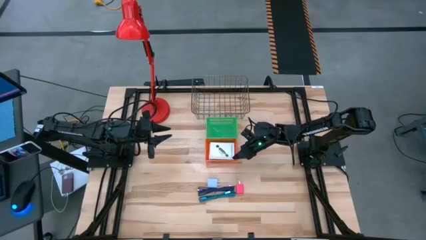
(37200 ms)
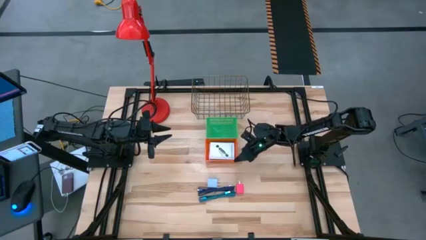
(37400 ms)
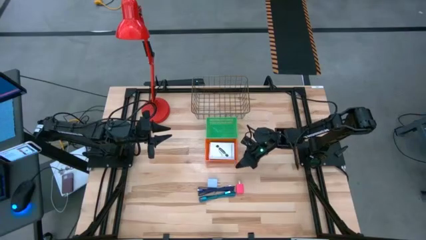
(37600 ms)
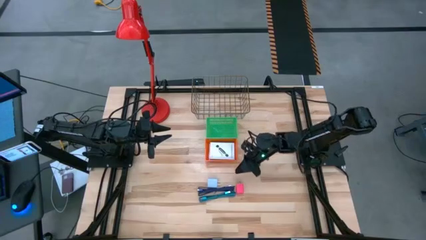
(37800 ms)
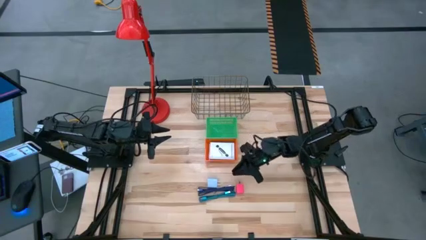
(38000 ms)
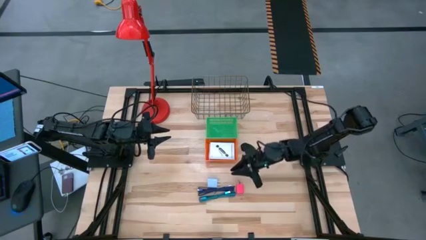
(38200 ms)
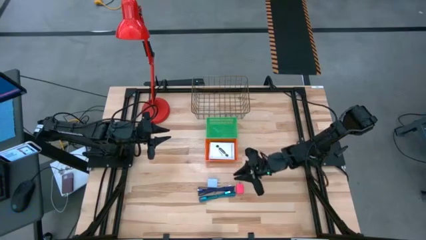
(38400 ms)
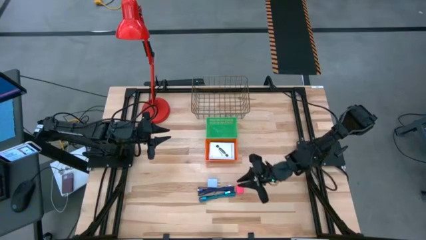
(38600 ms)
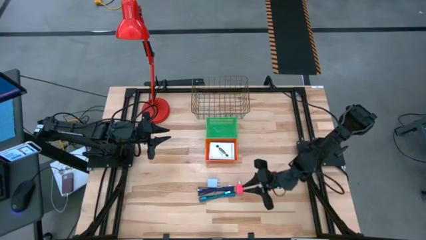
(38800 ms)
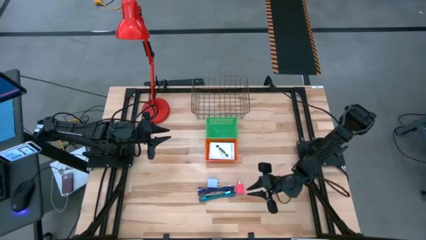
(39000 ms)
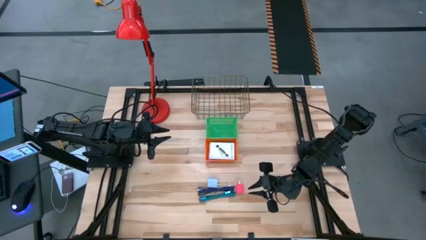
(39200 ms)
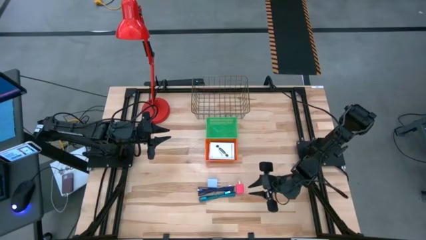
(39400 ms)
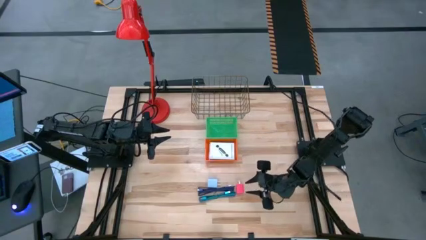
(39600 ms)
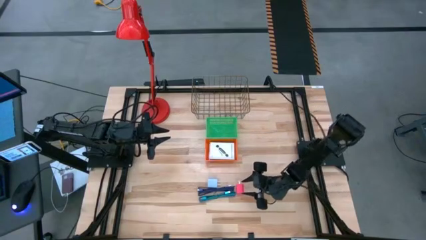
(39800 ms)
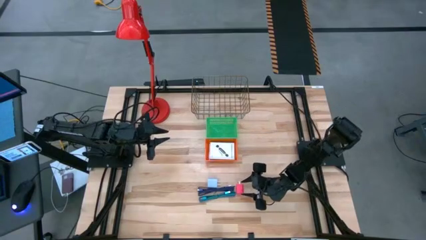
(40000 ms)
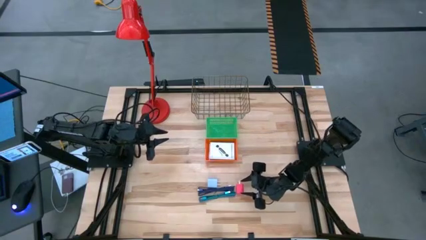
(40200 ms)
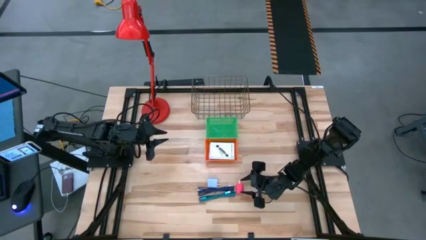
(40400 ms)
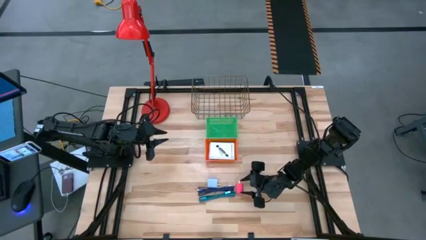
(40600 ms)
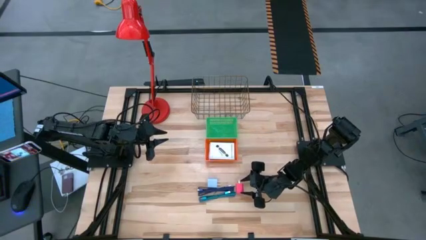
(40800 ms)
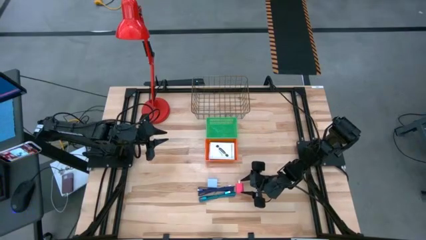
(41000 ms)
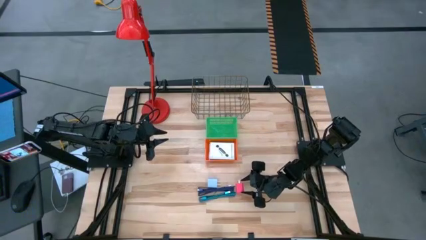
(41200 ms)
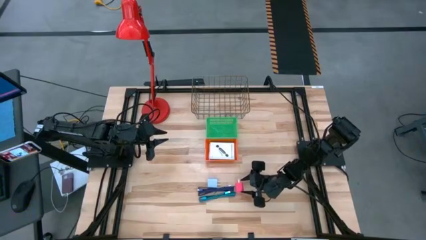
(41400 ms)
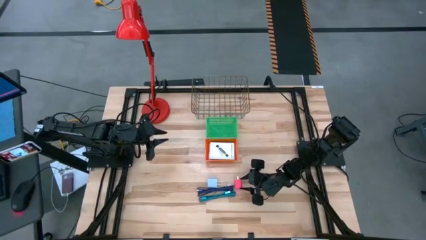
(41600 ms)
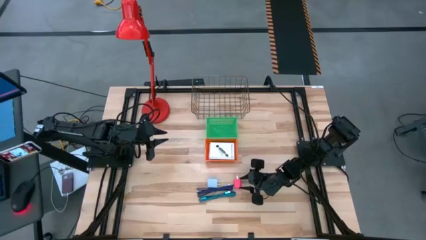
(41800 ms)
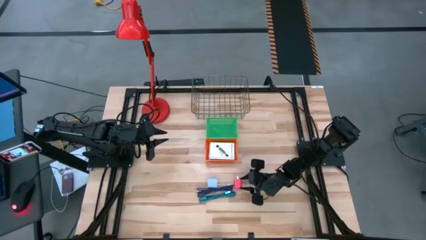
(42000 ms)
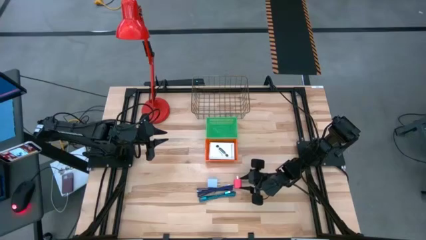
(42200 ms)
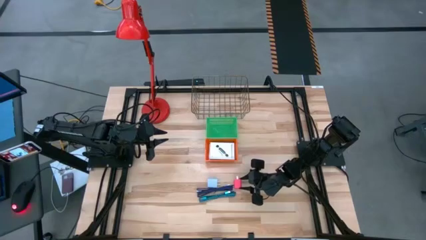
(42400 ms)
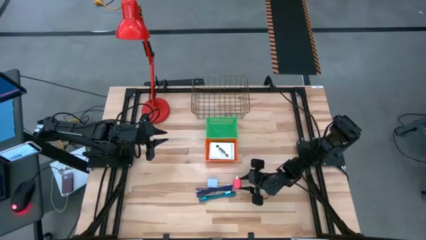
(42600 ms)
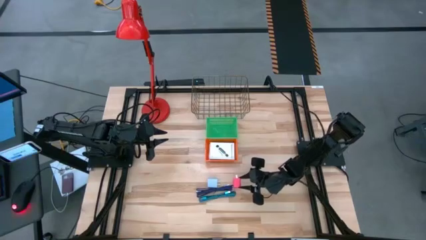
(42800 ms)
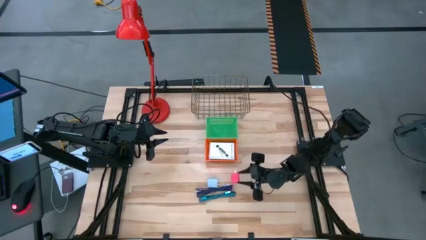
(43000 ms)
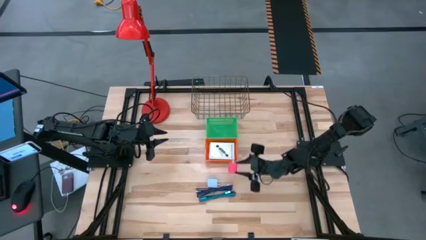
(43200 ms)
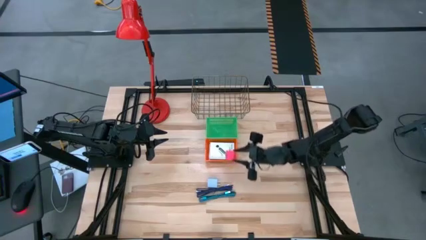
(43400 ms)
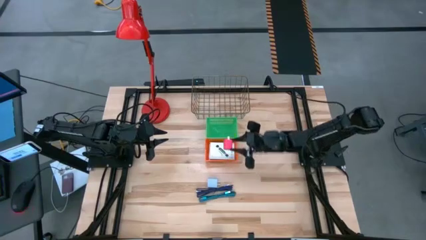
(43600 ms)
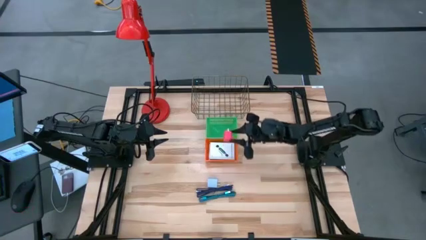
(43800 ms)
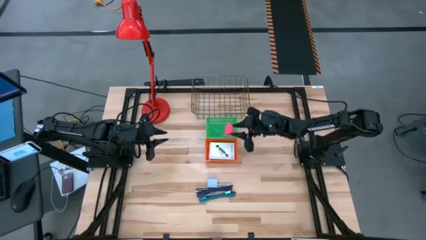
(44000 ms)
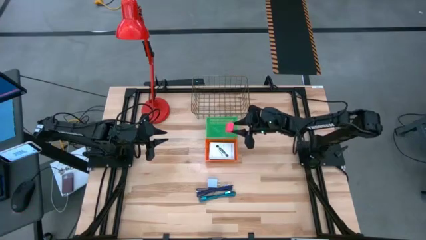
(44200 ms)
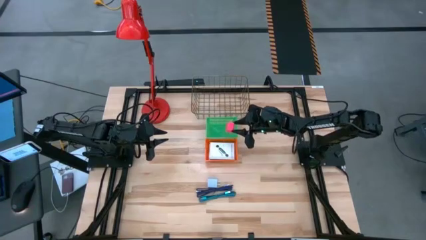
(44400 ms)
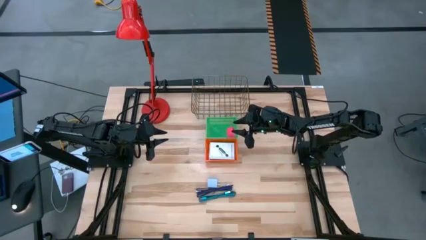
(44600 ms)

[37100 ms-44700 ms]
Task: Pick and place items into bin
Put the pink charger adapter into the green basket

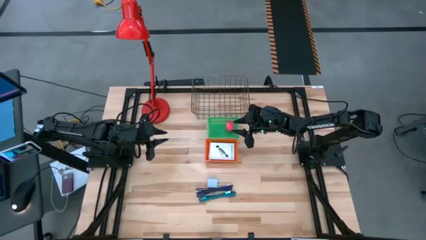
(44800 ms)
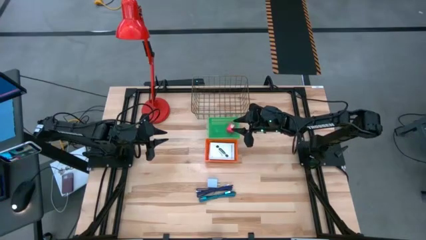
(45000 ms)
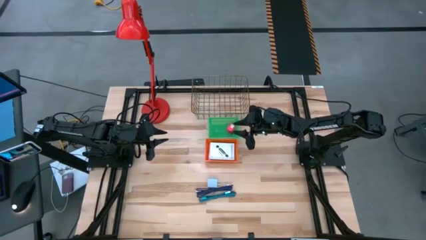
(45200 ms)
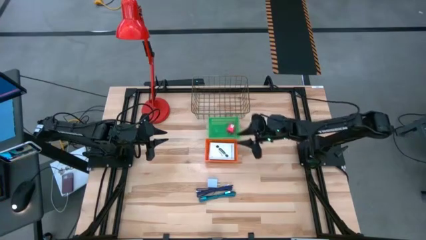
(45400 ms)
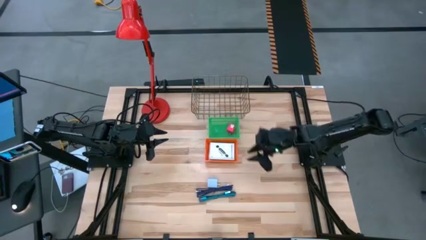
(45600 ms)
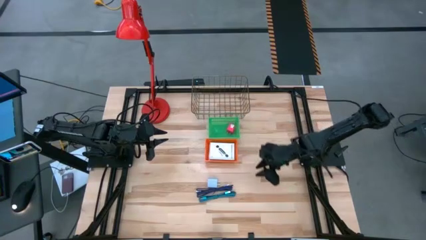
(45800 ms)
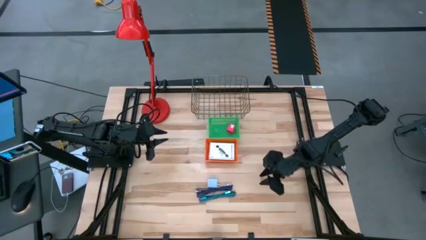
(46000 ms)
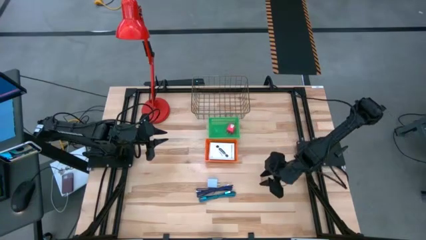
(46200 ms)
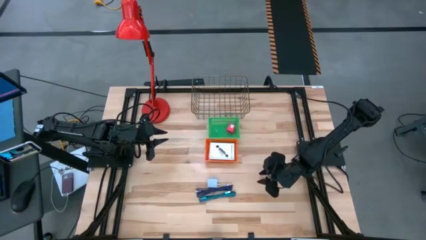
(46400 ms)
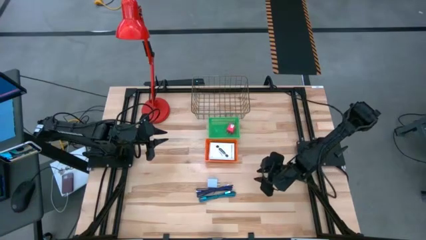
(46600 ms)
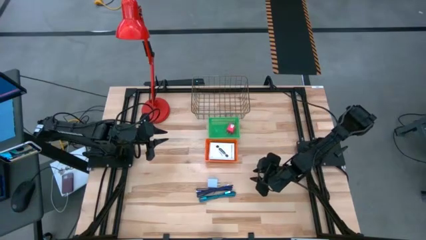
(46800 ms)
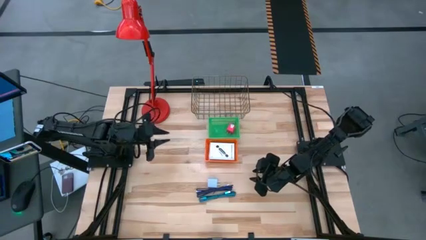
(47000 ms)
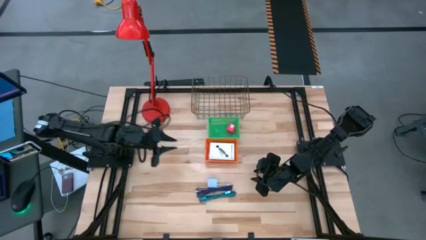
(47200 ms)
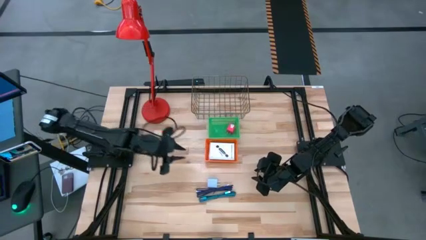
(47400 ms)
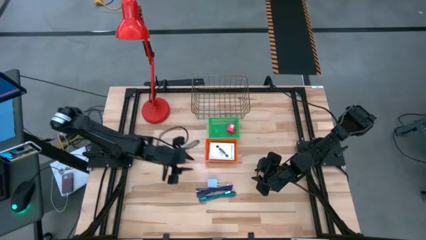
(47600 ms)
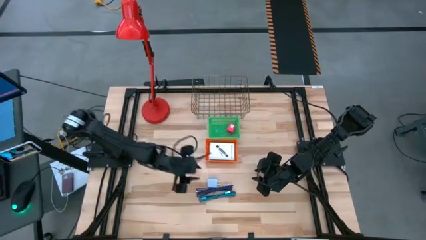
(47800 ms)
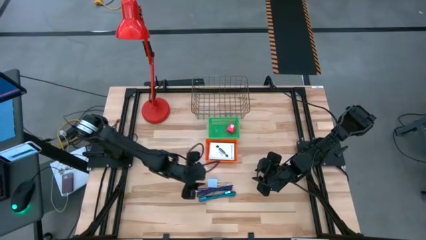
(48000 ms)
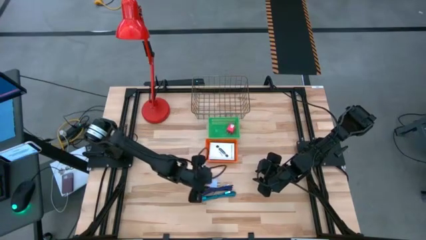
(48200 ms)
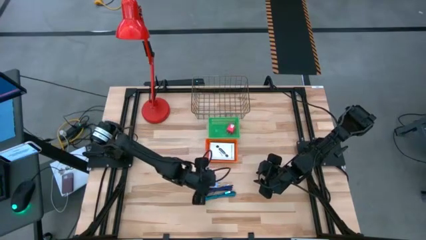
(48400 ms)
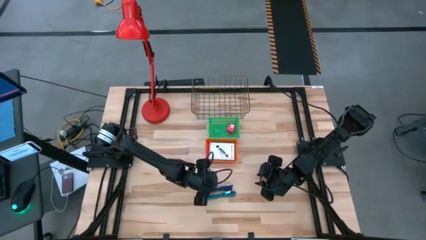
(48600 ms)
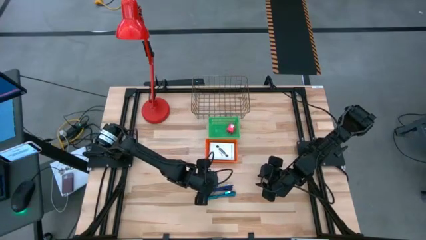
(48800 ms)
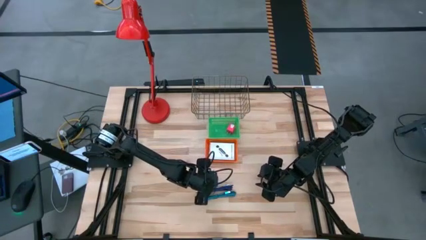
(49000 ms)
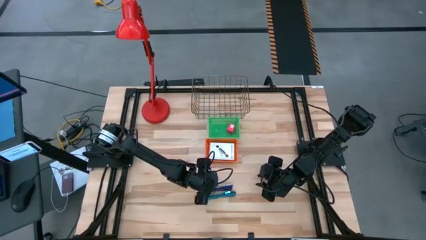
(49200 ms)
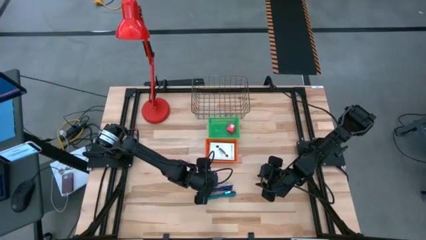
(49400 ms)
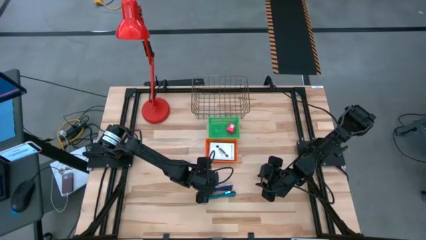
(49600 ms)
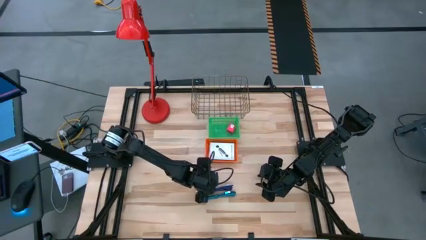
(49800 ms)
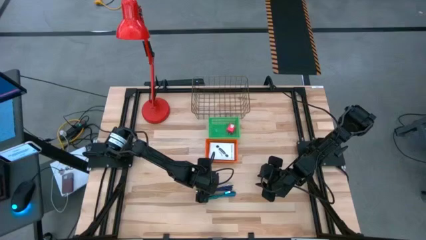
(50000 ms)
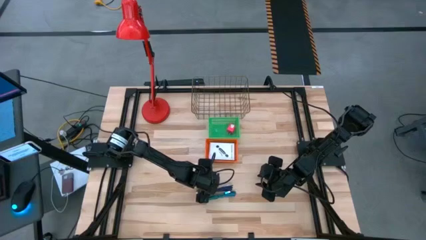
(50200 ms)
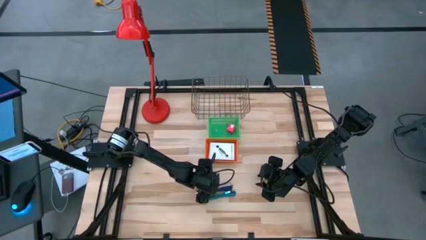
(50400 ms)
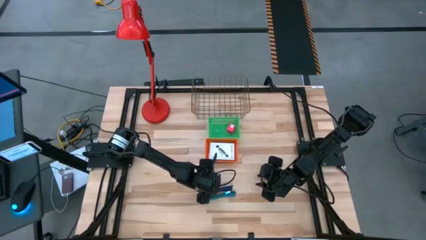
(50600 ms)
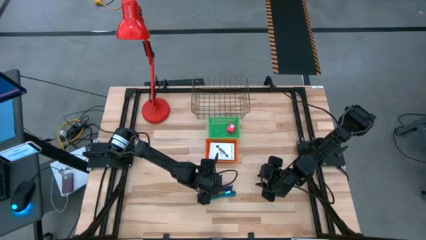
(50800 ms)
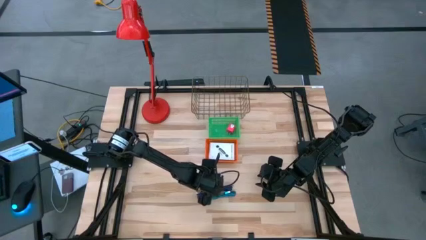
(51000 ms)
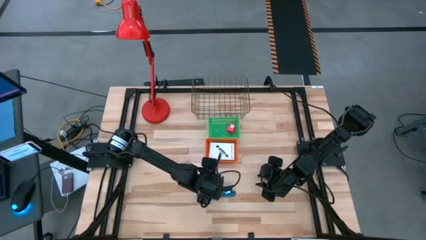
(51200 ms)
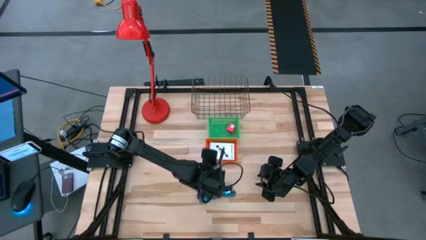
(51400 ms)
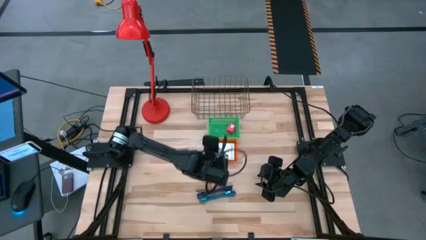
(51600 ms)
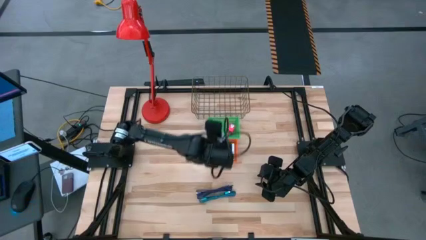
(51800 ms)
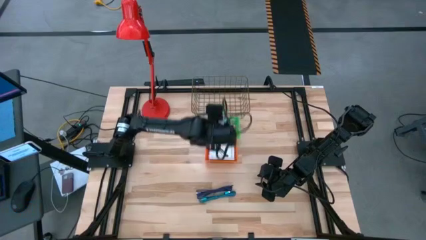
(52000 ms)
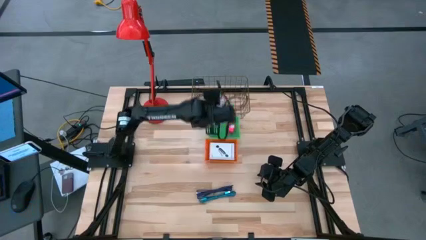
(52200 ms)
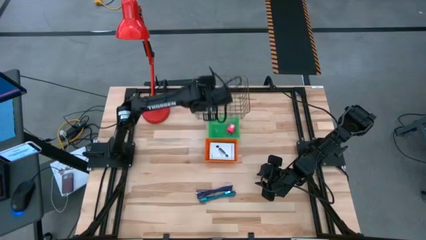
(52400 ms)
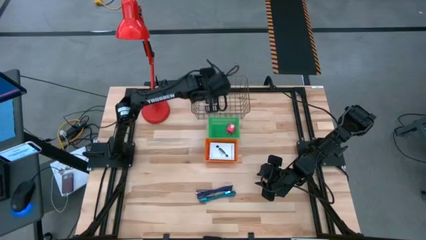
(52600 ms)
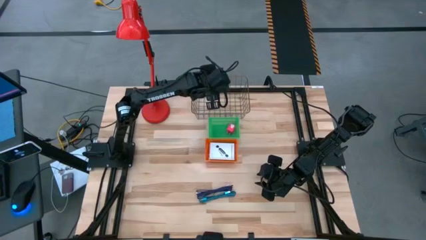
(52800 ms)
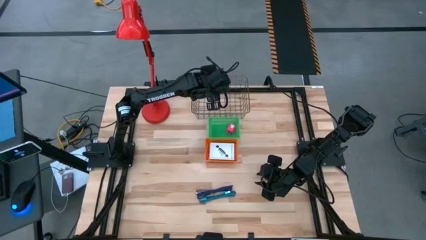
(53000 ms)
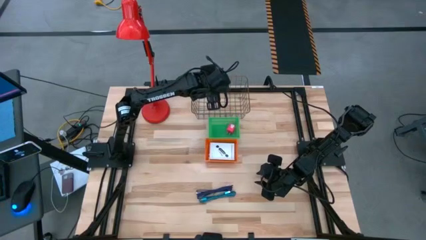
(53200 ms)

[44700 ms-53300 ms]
Put the blue charger adapter into the green basket
